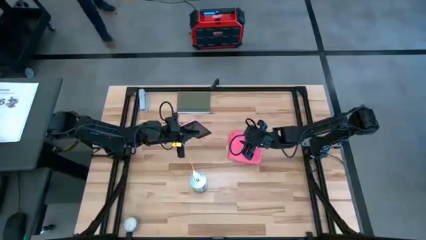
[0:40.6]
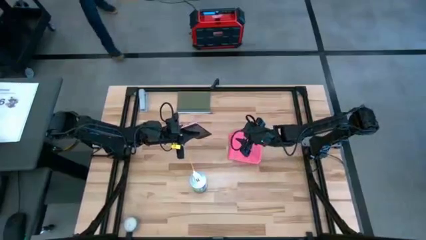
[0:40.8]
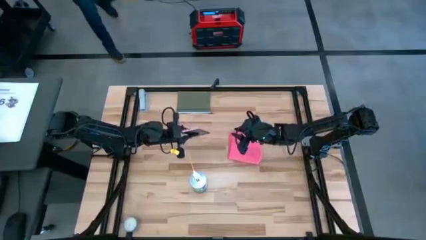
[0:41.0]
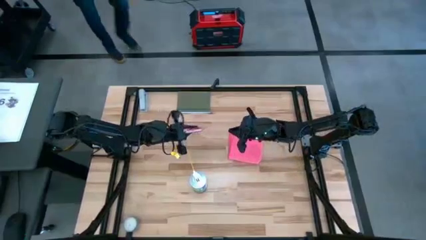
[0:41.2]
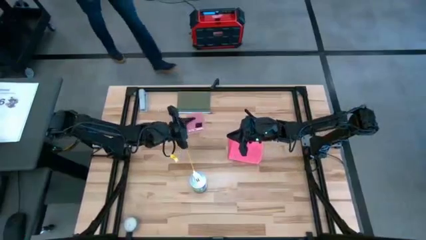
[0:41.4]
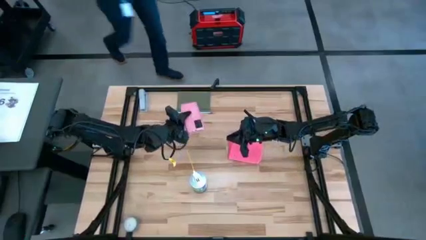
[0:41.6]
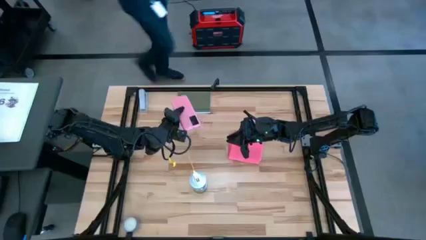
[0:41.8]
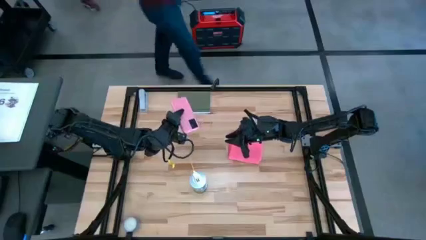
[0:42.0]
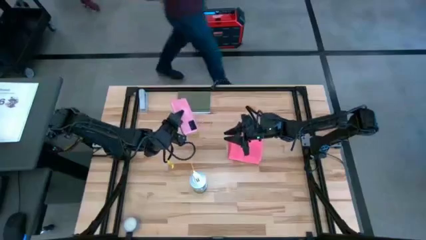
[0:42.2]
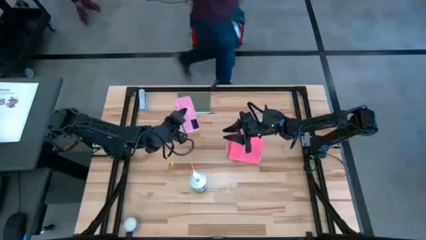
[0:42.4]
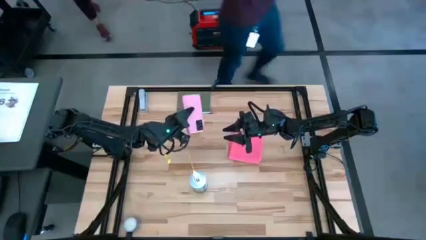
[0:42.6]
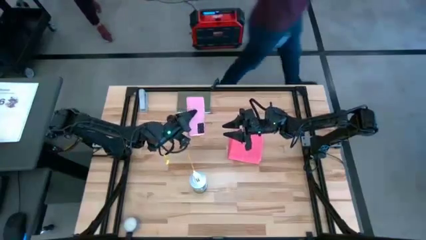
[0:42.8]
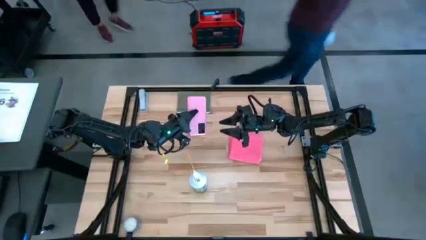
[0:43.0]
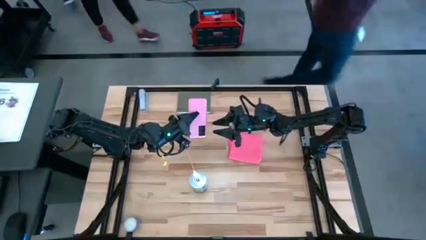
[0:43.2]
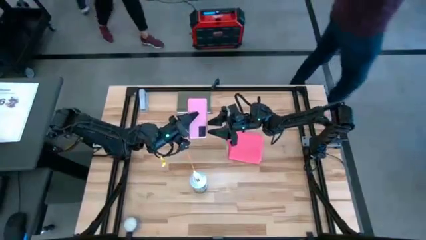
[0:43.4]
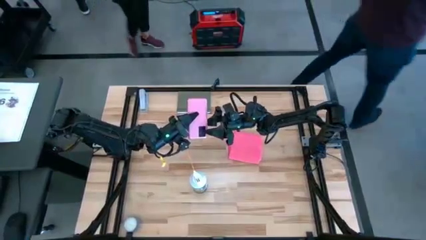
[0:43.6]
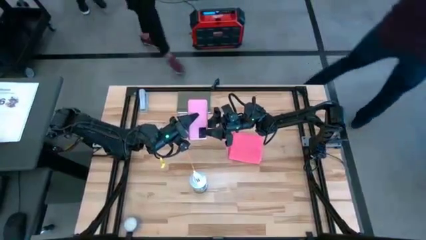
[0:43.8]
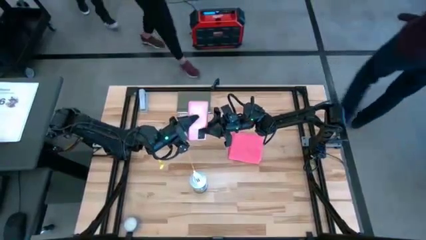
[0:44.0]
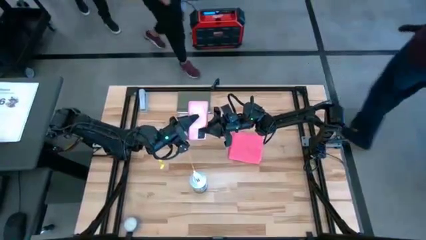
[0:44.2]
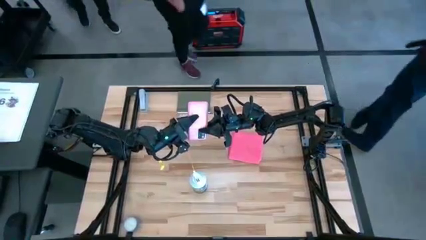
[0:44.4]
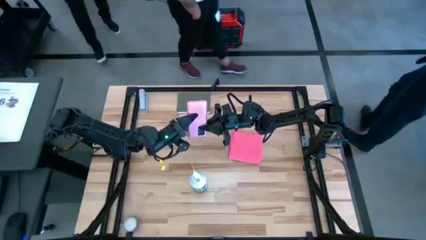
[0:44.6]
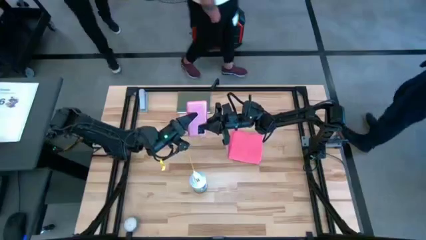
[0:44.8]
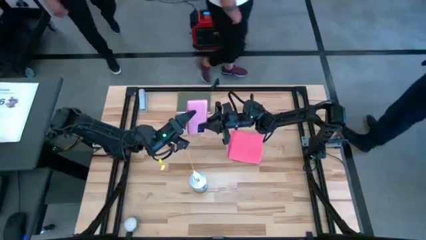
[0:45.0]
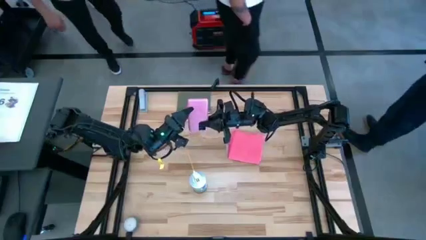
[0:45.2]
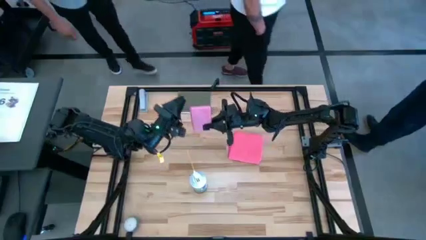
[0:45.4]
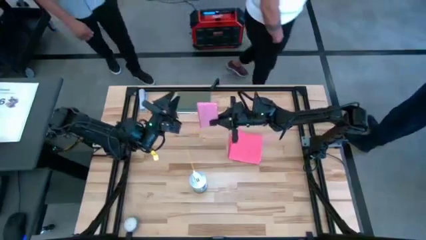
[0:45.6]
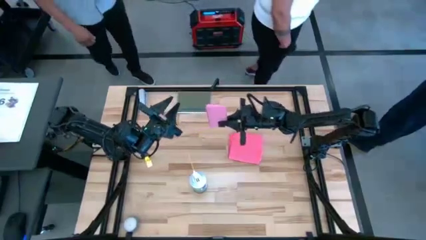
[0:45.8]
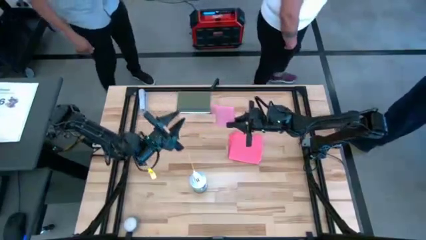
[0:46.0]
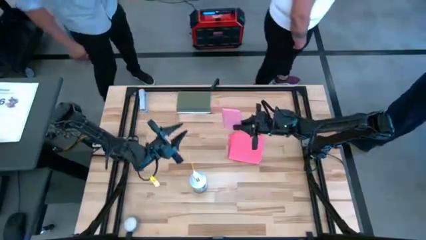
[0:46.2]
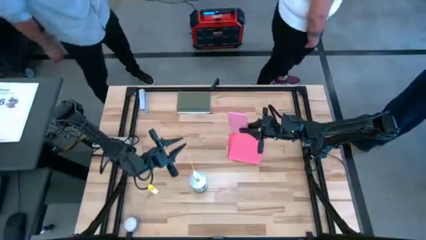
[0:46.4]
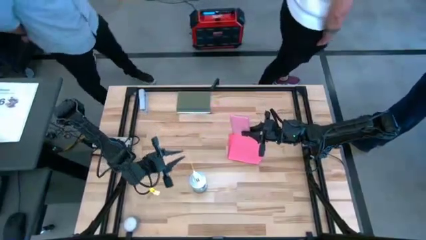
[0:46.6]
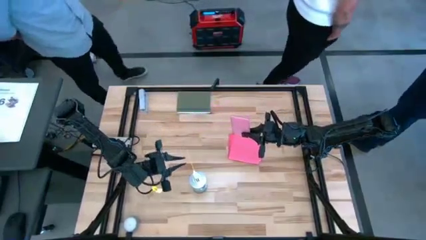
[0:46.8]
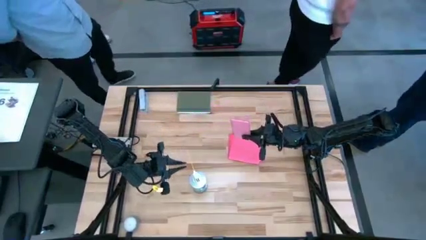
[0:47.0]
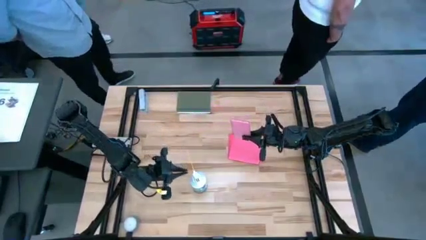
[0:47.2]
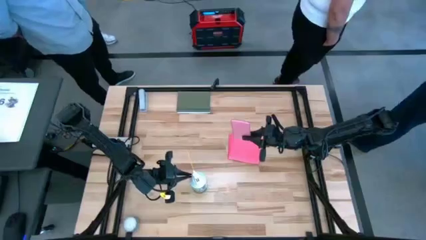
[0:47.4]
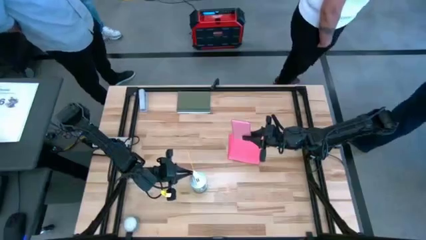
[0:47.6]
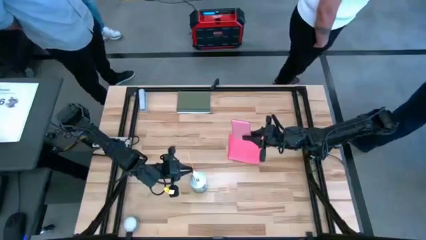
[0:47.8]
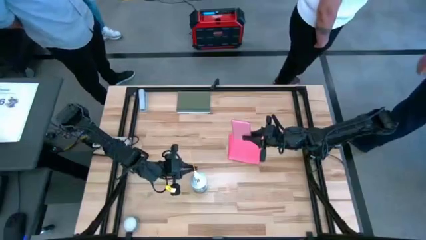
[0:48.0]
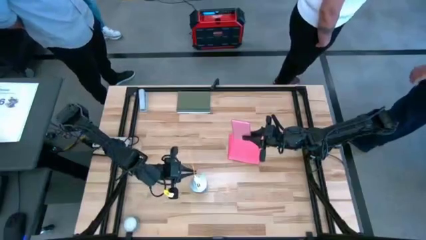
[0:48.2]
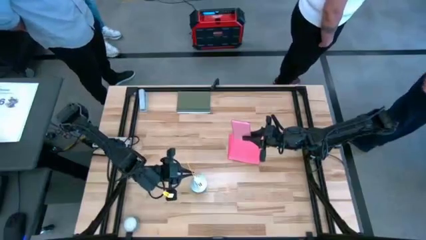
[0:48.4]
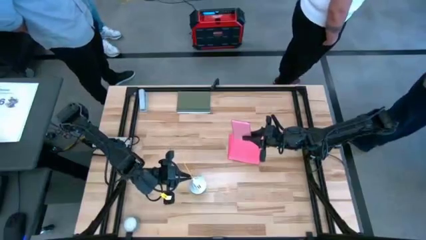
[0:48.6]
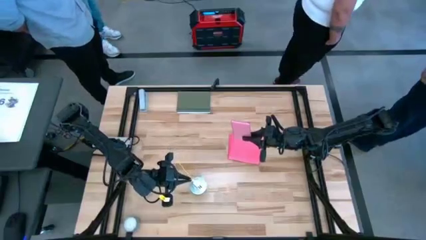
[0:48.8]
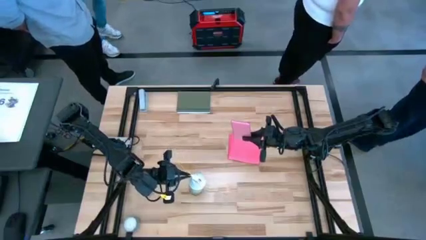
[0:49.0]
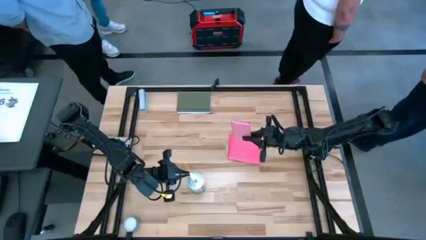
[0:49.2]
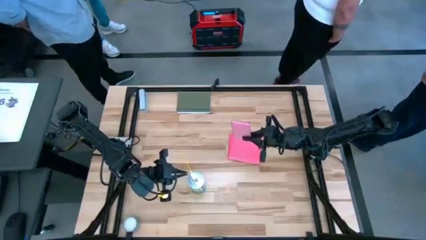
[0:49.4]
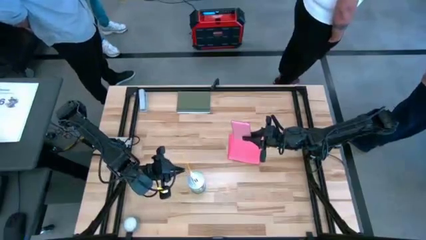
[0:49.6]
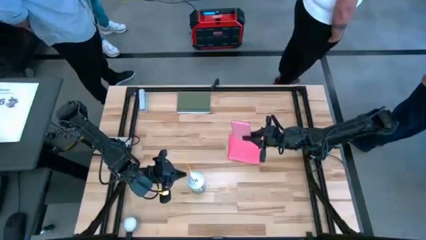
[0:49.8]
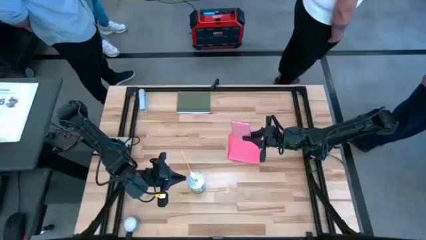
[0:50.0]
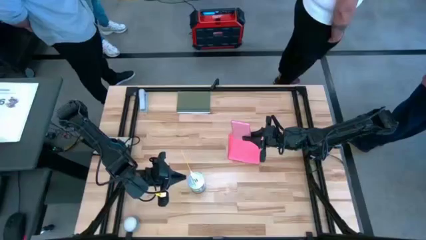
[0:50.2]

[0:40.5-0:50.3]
Task: Apply microfiber cloth
Spray the back of the pink cellphone with the white spray bottle

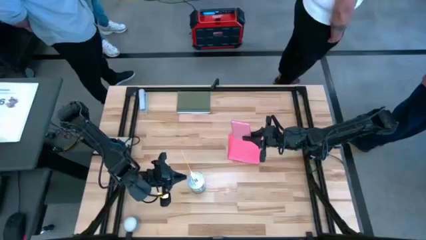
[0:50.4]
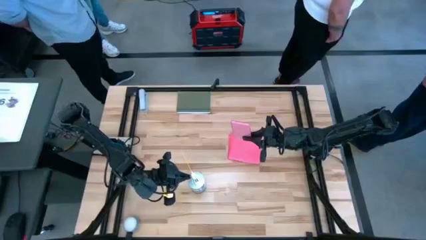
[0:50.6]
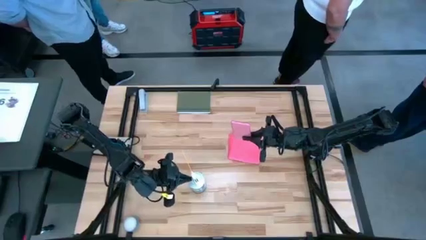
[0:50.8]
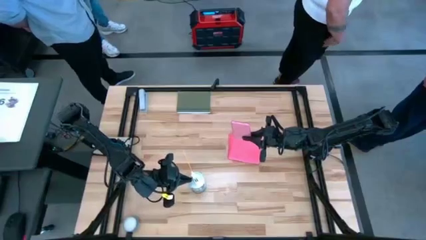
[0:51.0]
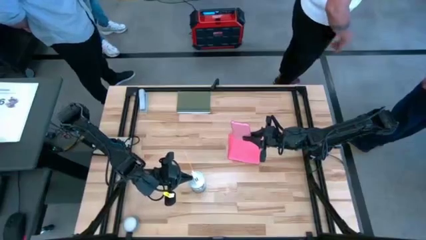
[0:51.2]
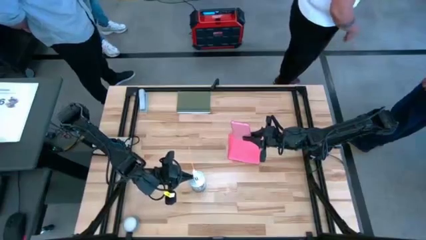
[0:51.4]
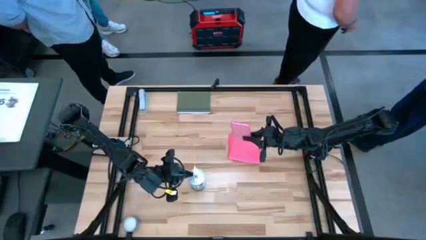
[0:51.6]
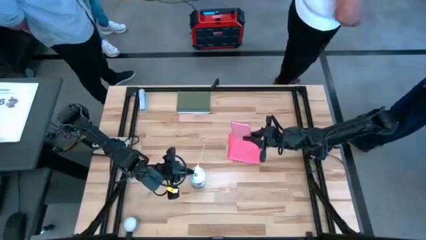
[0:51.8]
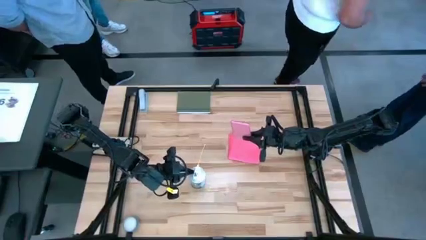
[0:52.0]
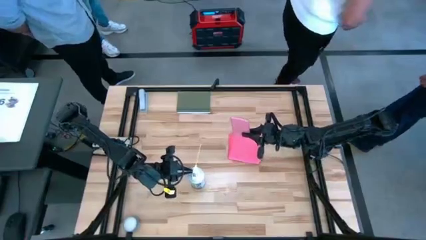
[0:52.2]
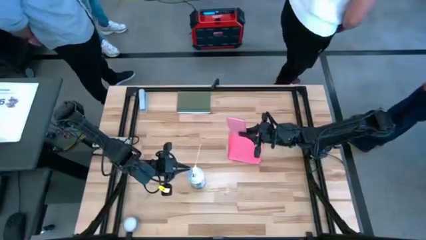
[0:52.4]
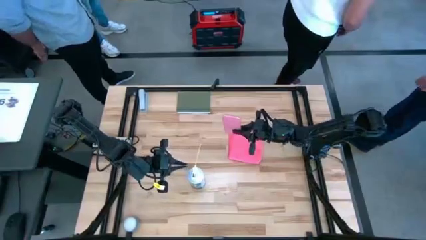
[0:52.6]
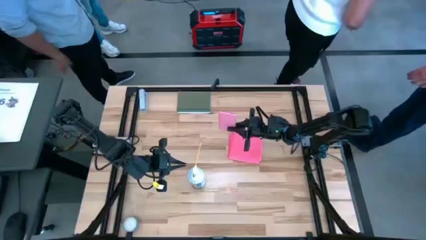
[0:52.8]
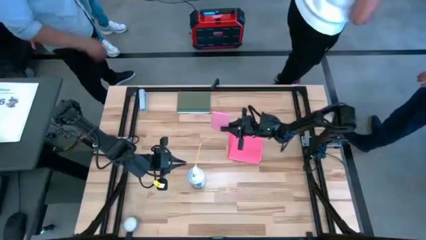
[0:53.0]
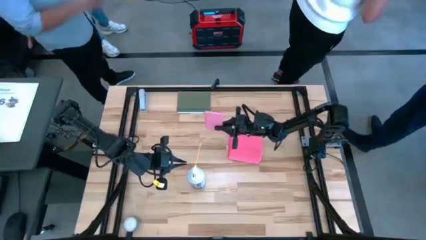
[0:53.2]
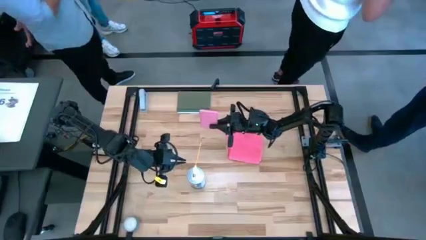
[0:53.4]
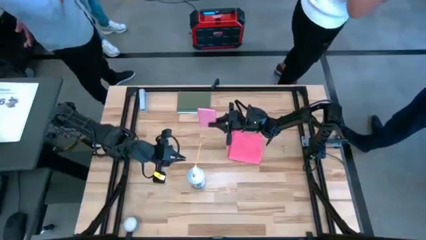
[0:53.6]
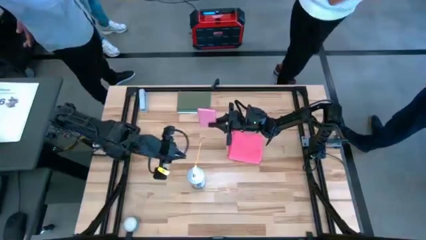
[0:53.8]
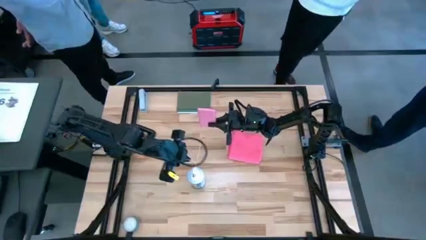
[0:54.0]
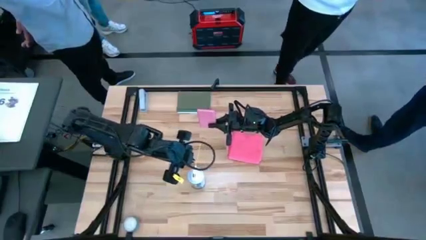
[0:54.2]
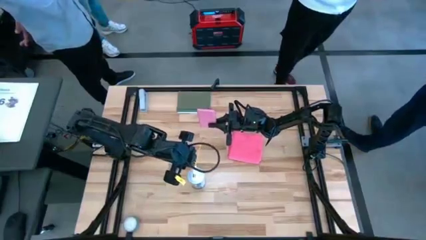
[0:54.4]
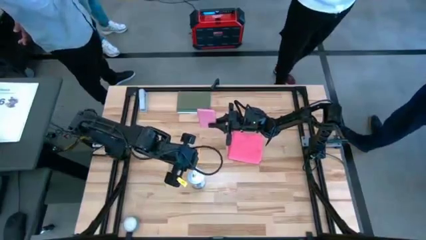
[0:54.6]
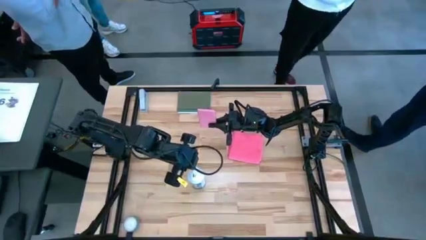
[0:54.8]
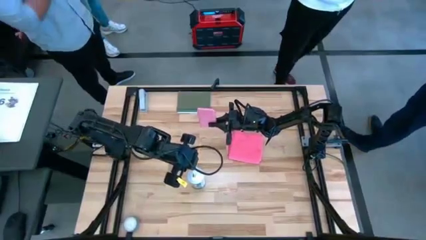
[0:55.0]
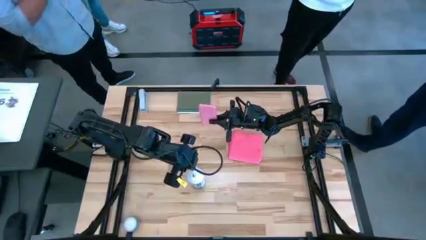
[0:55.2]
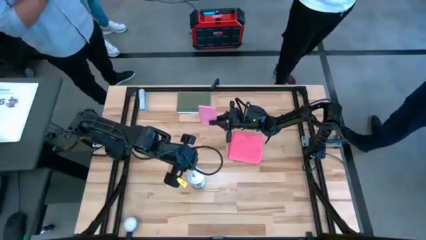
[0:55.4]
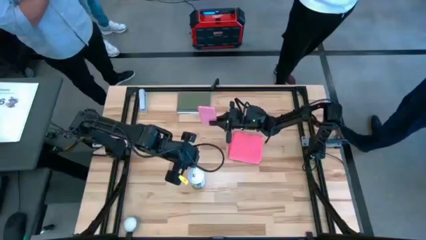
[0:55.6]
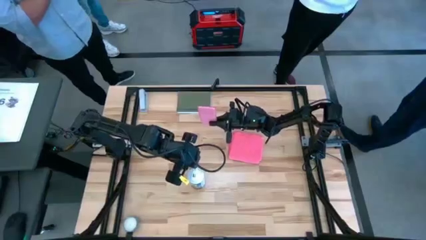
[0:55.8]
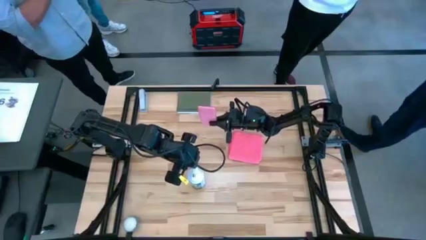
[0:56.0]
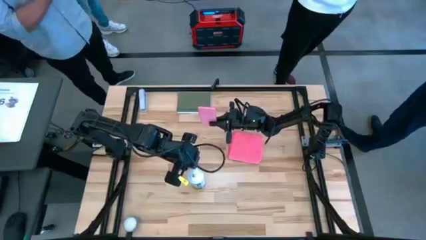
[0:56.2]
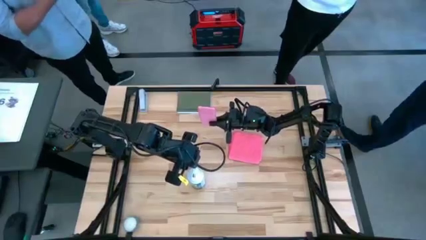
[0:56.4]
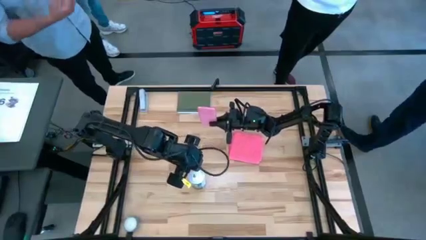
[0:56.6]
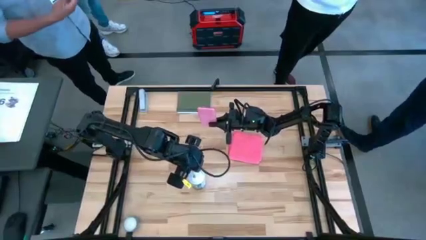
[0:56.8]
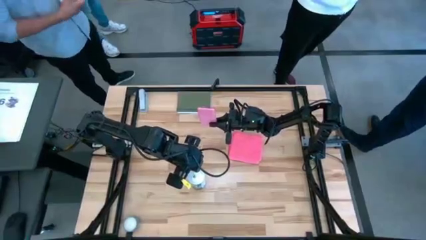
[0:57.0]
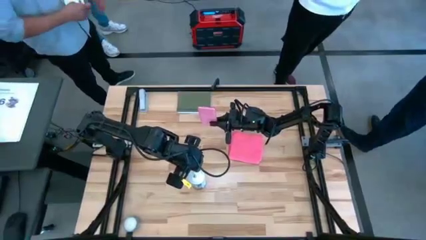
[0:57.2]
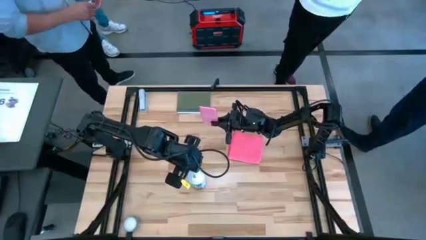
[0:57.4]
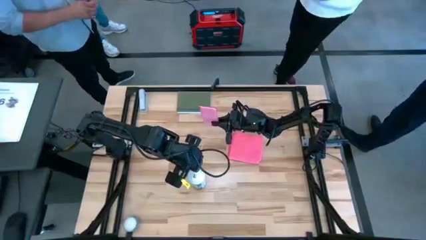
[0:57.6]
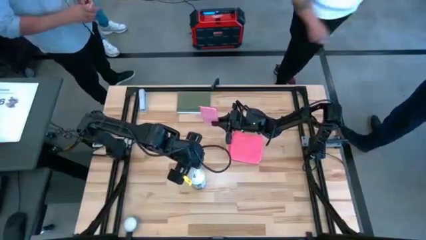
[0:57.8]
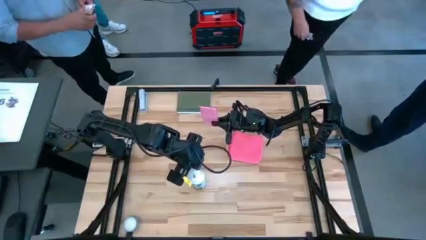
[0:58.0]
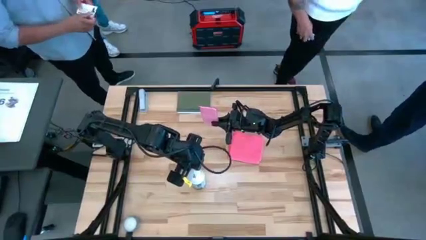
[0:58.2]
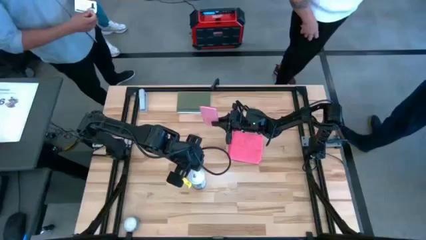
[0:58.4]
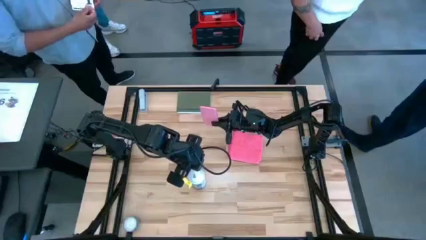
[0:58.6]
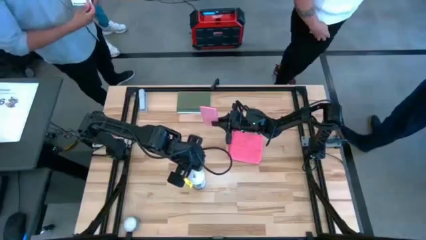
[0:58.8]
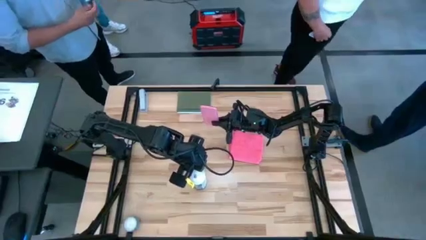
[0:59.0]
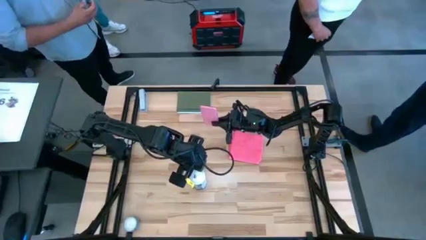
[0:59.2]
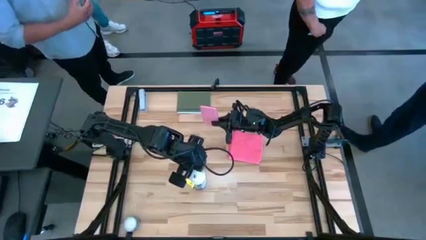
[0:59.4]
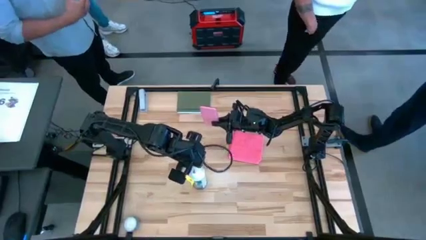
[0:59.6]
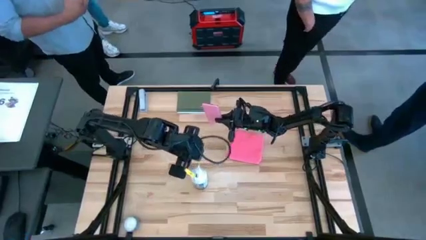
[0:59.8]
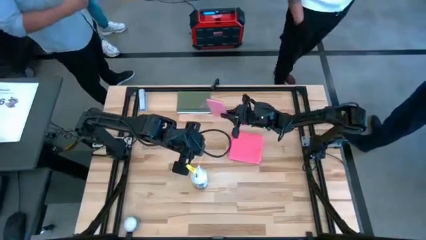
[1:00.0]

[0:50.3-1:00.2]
Spray the back of the pink cellphone with the white spray bottle
